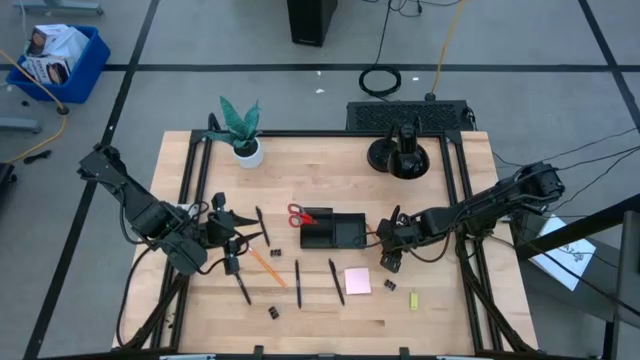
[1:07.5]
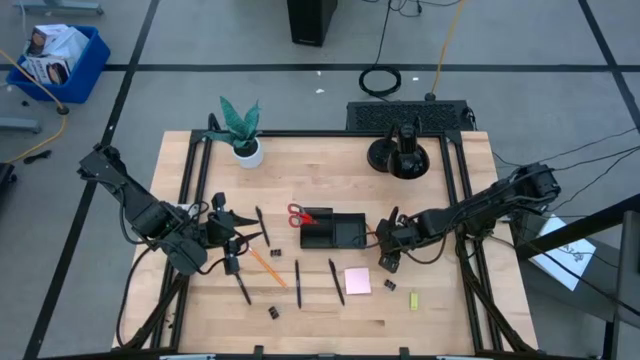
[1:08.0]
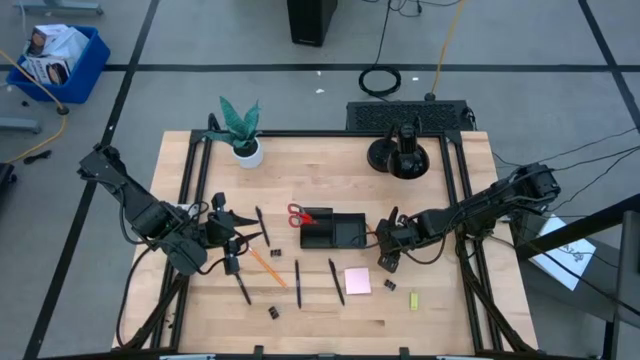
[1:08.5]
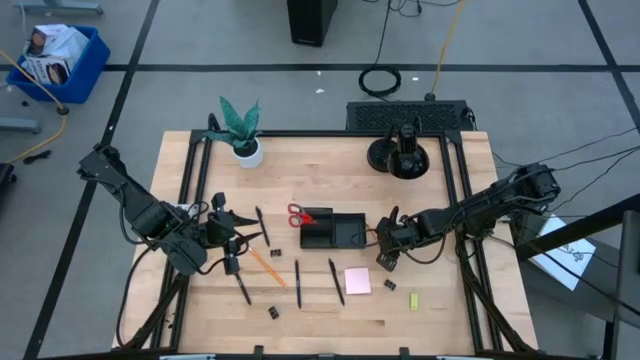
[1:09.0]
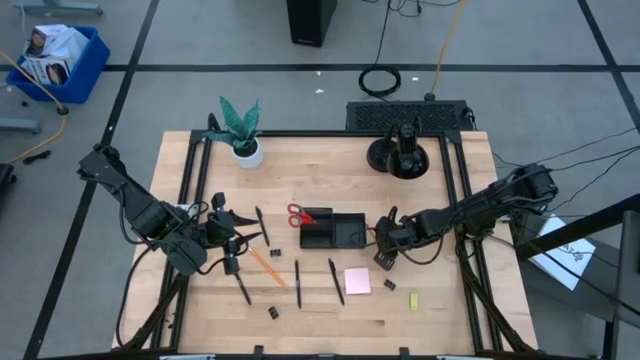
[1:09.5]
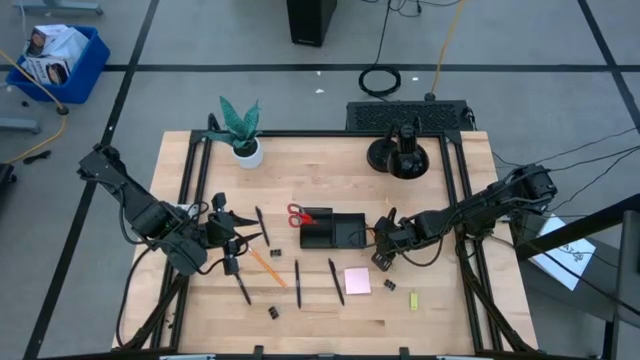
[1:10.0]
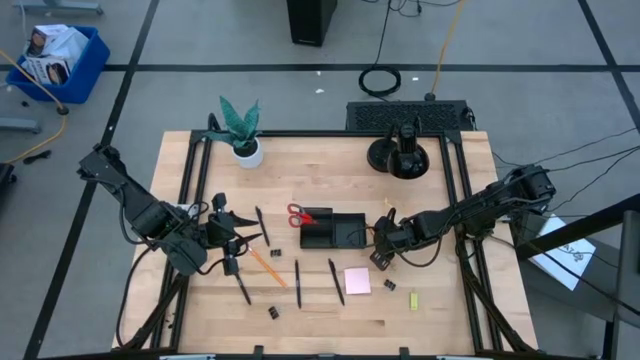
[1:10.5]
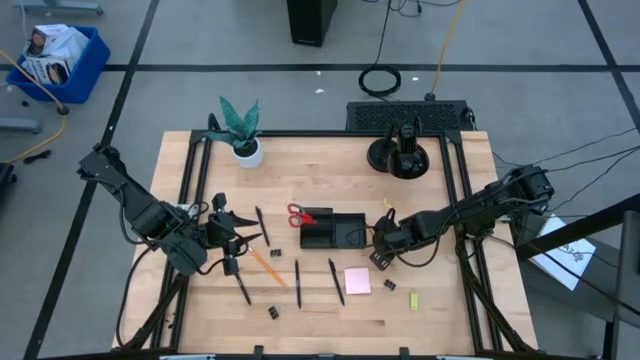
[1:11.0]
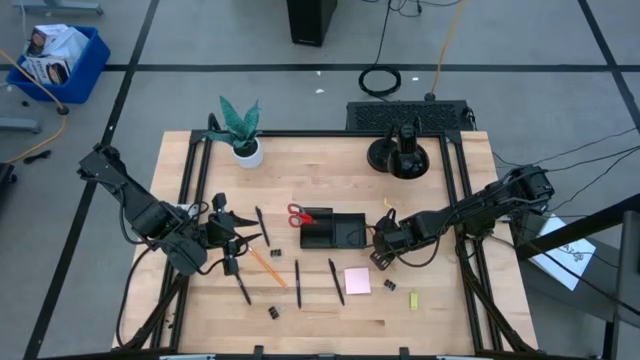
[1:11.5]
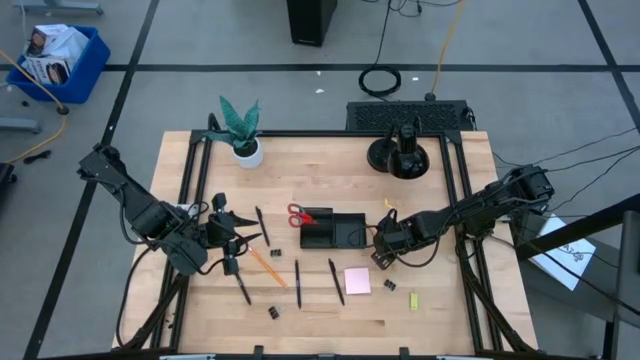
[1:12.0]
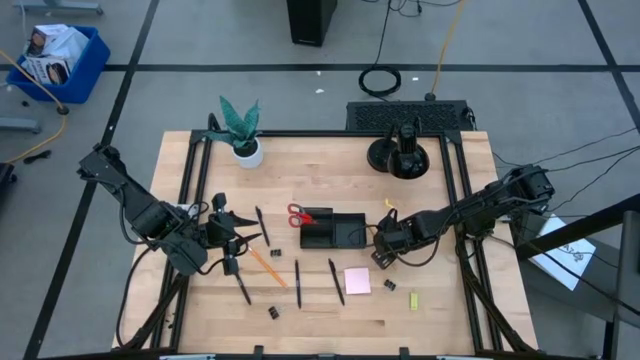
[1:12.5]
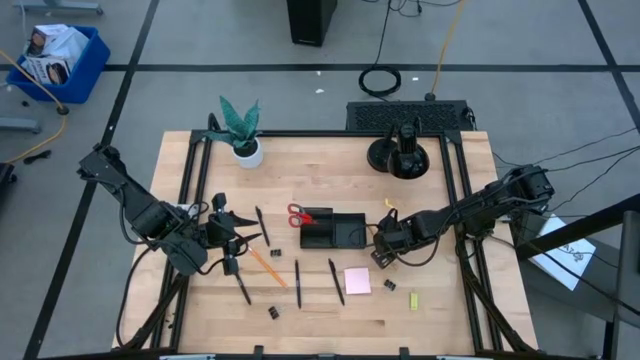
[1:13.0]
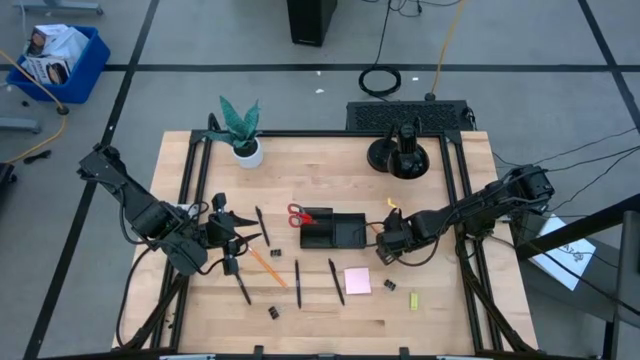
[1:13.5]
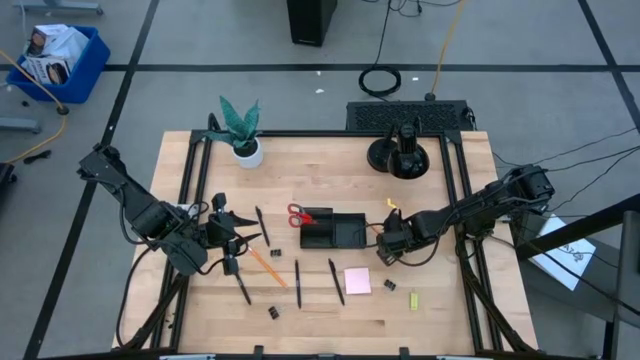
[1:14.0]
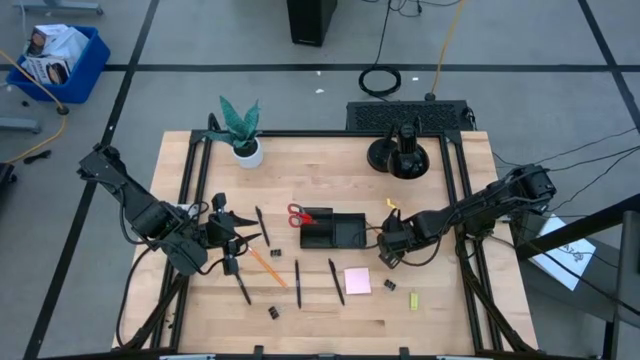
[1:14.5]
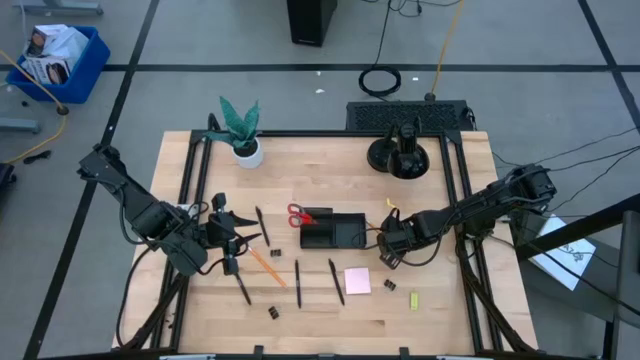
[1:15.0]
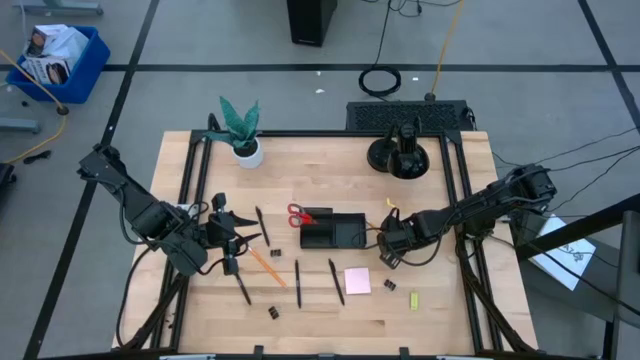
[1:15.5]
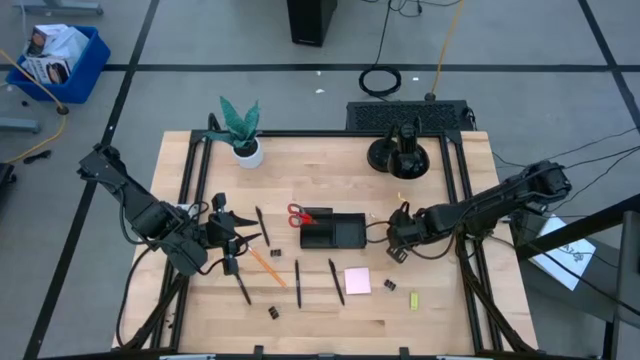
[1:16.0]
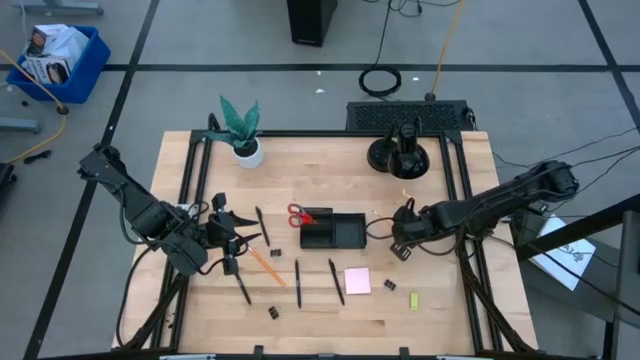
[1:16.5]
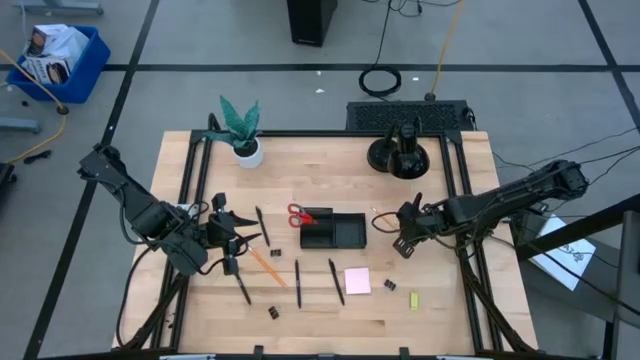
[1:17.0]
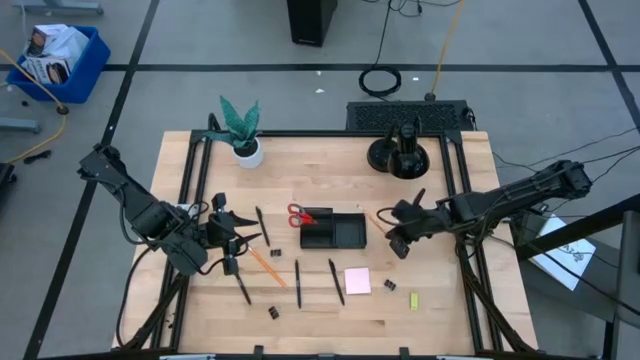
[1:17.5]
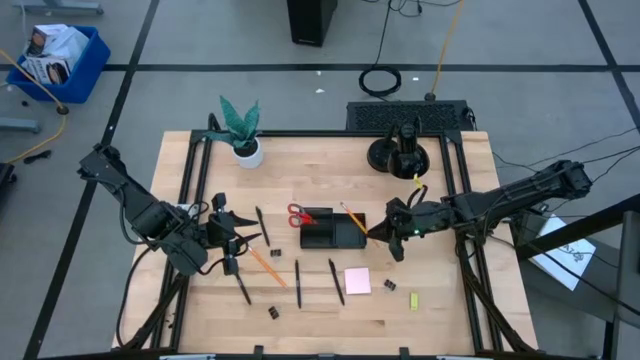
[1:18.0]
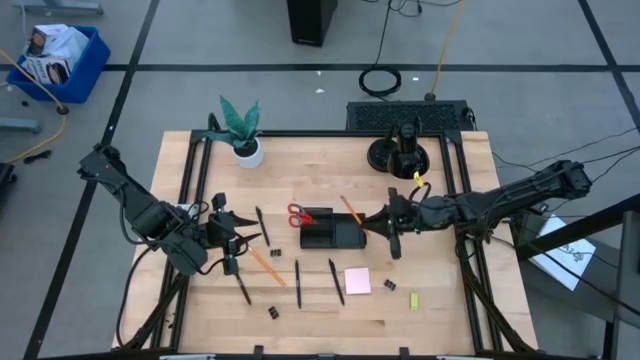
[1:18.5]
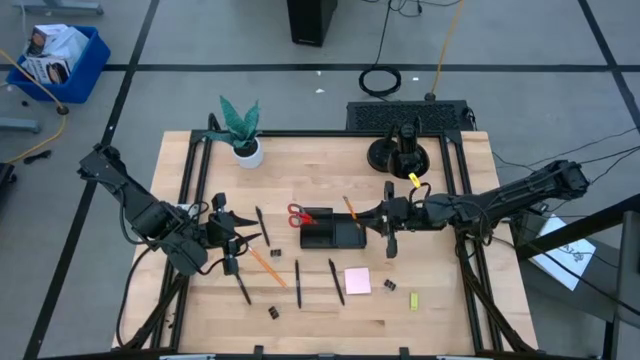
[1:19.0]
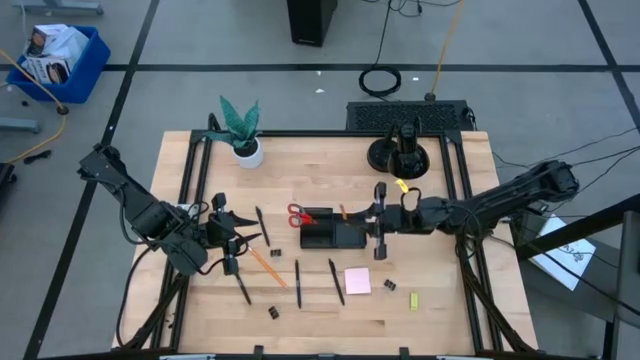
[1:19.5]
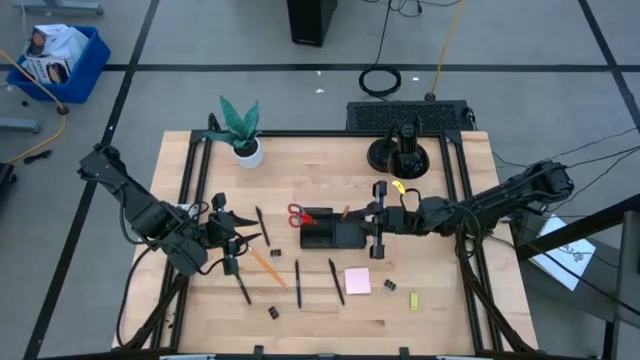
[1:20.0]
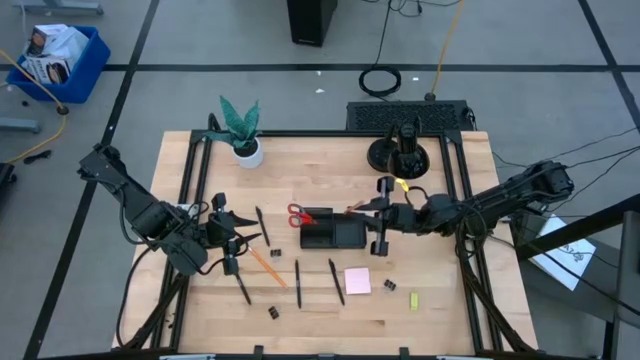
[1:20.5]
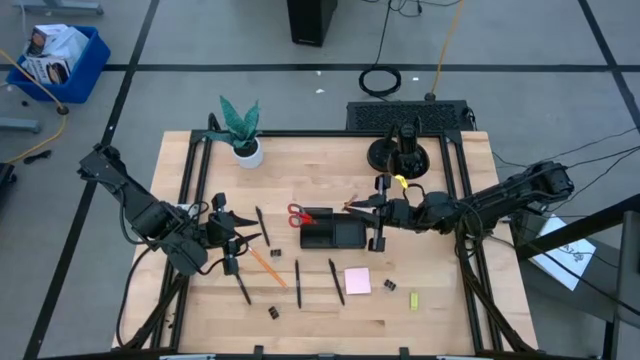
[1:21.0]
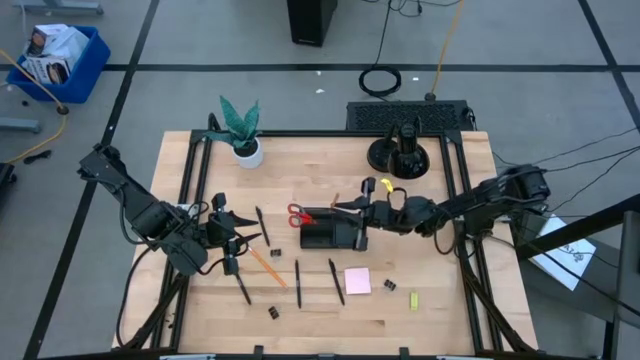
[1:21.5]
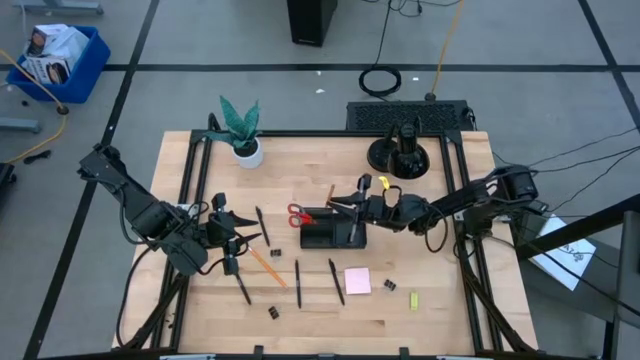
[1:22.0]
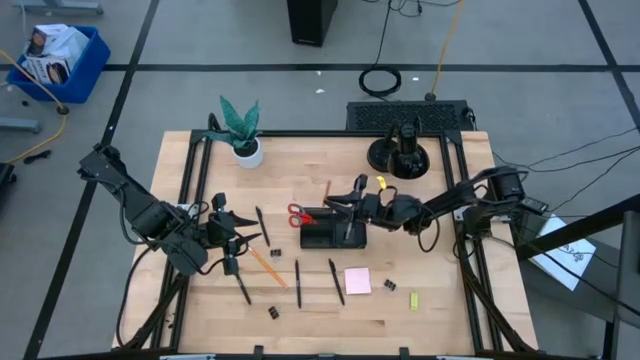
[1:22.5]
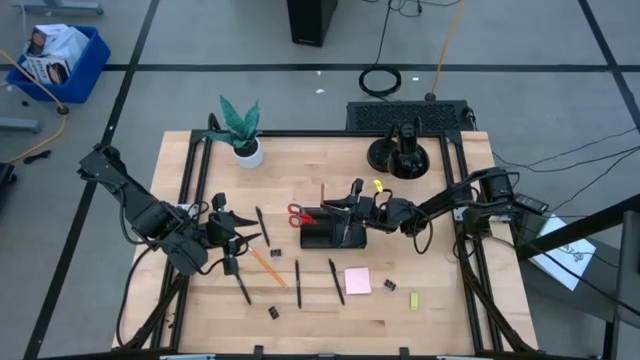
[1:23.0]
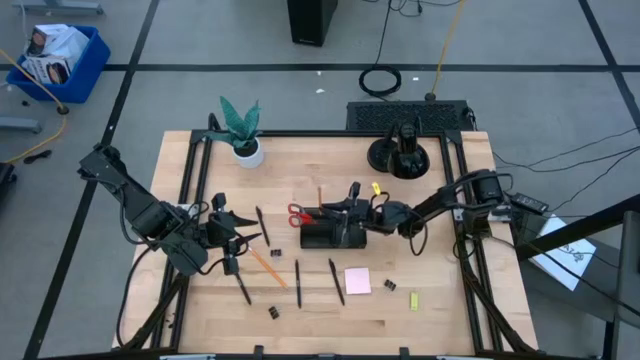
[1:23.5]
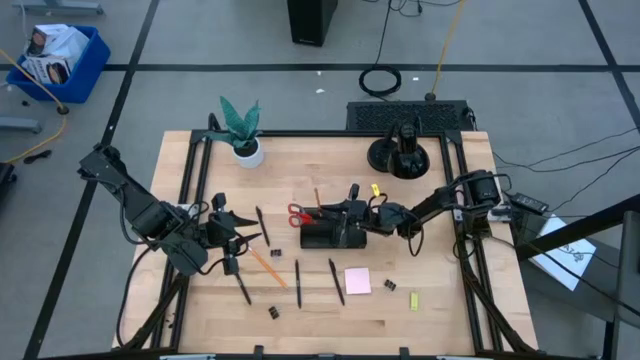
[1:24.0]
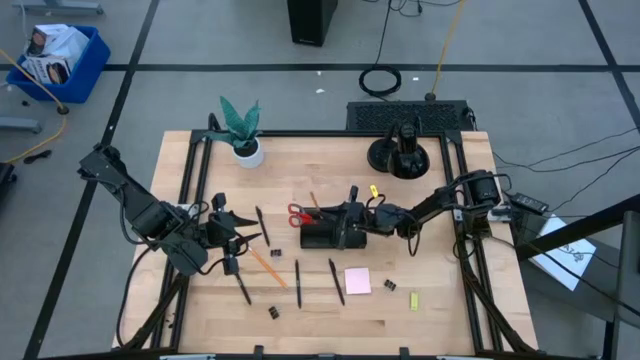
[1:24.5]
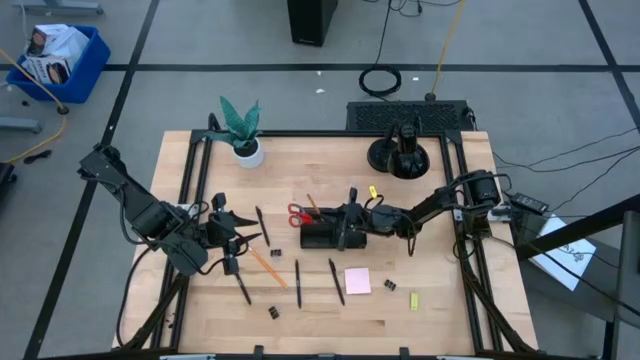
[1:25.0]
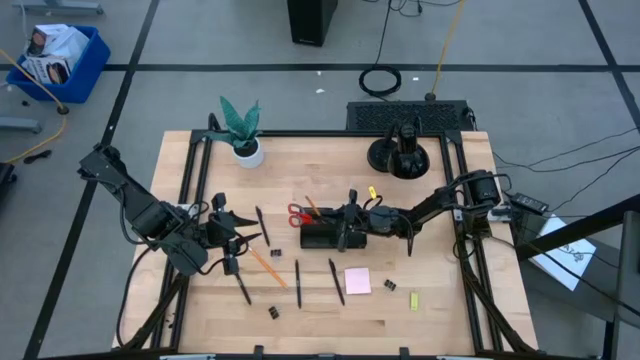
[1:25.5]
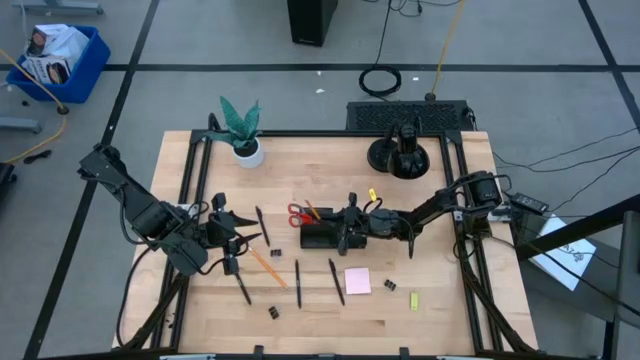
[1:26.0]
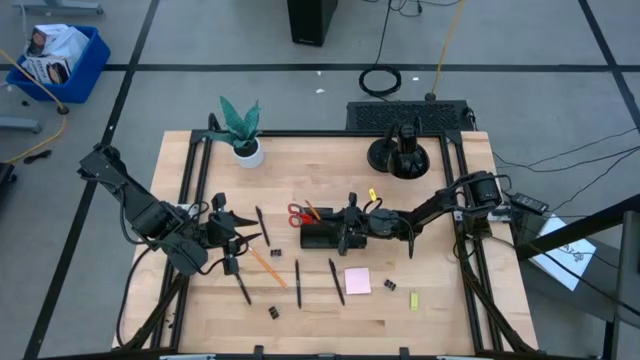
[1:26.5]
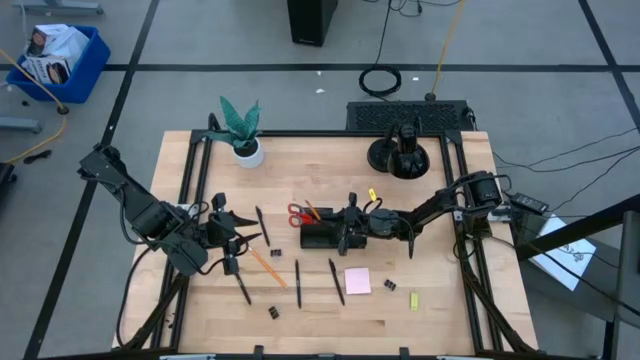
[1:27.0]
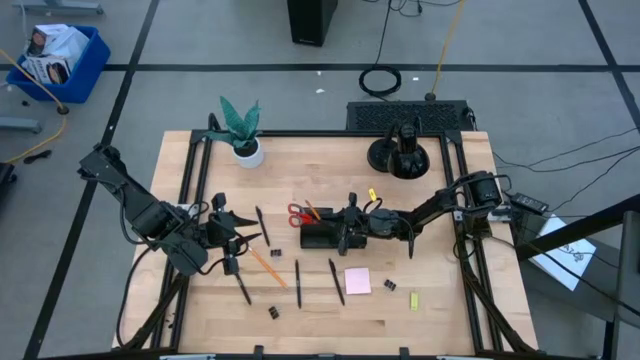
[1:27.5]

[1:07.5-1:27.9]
Task: Pick and place office supplies into organizer
Put the right orange pencil into the desk organizer
